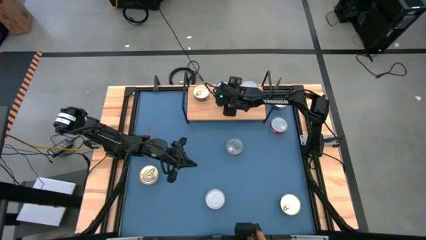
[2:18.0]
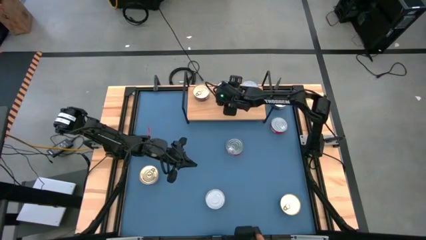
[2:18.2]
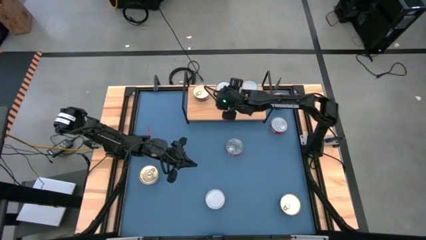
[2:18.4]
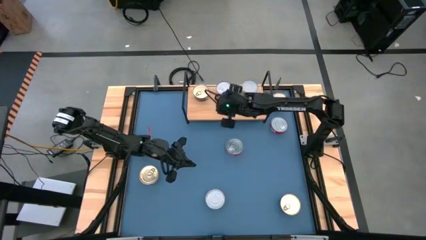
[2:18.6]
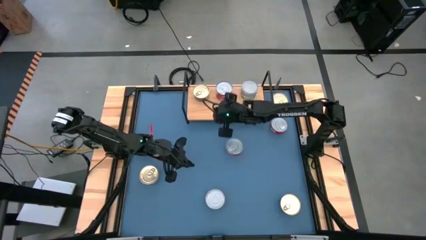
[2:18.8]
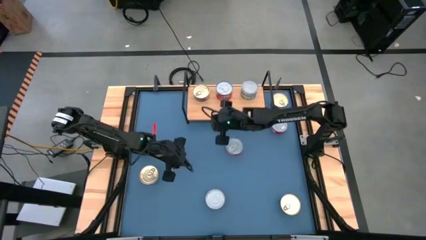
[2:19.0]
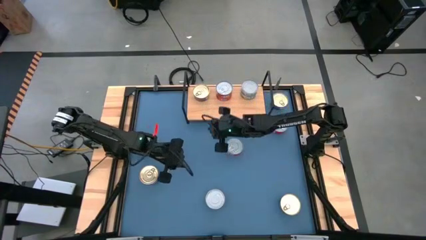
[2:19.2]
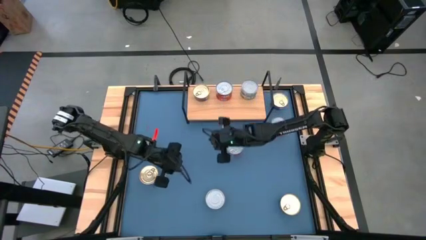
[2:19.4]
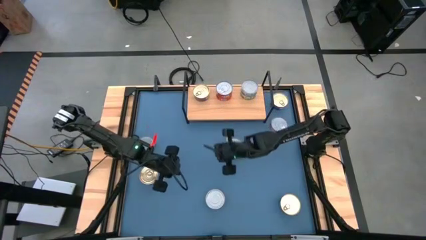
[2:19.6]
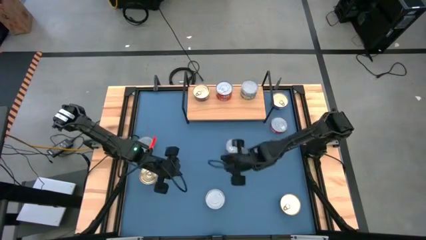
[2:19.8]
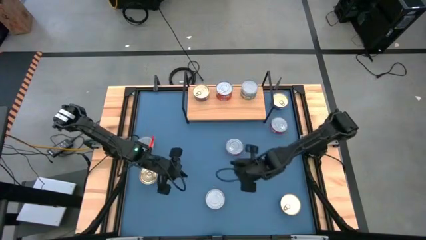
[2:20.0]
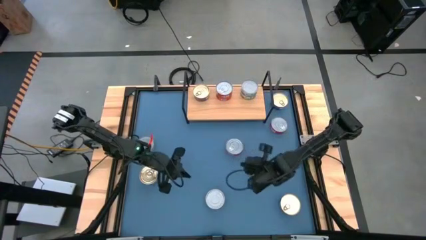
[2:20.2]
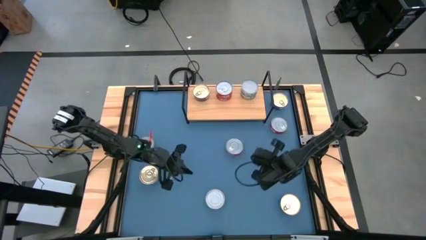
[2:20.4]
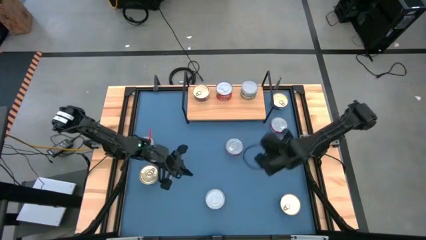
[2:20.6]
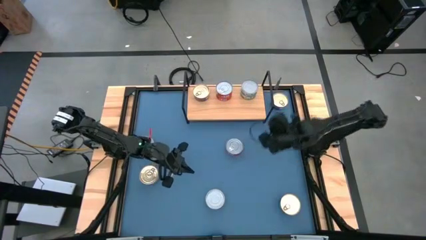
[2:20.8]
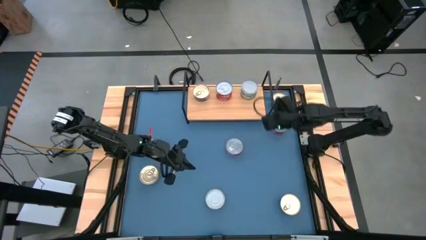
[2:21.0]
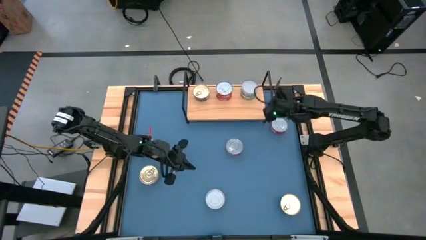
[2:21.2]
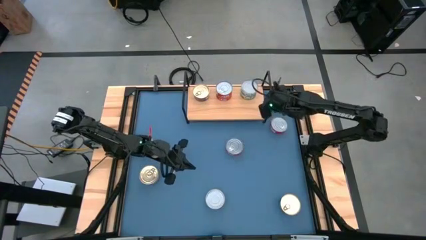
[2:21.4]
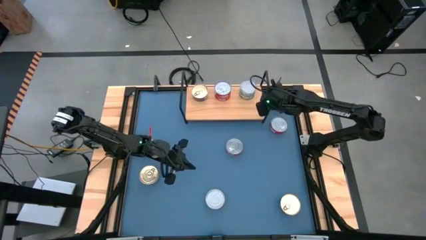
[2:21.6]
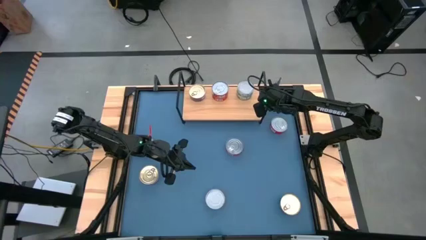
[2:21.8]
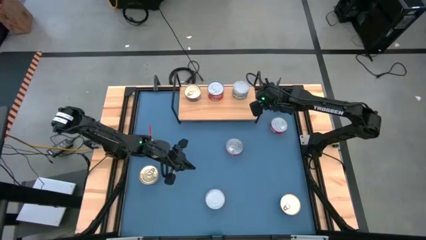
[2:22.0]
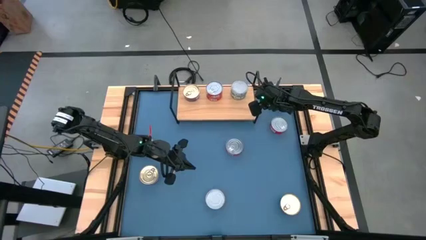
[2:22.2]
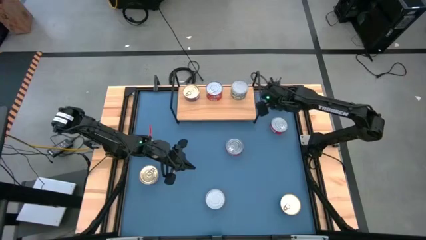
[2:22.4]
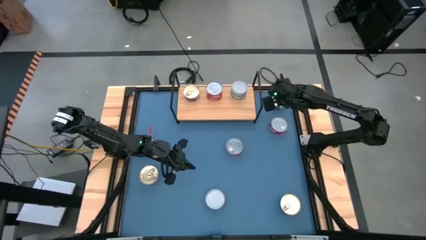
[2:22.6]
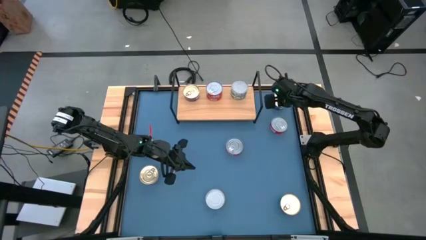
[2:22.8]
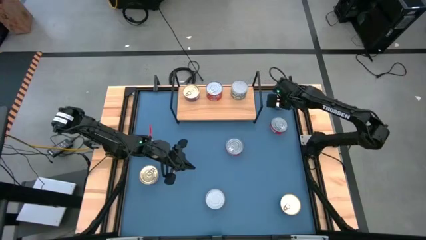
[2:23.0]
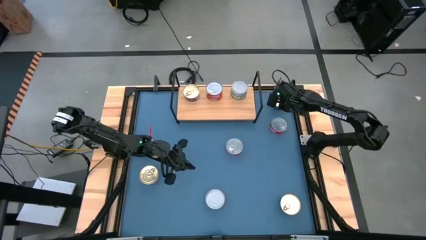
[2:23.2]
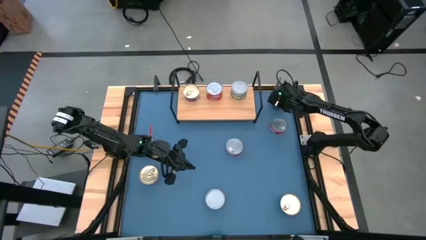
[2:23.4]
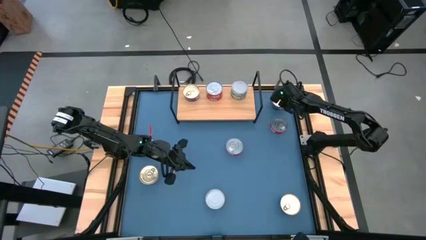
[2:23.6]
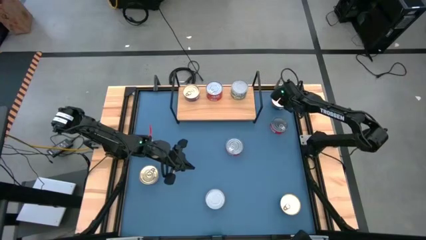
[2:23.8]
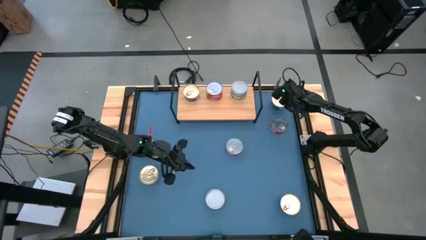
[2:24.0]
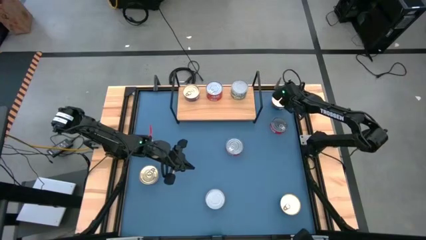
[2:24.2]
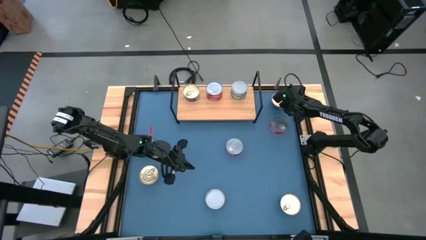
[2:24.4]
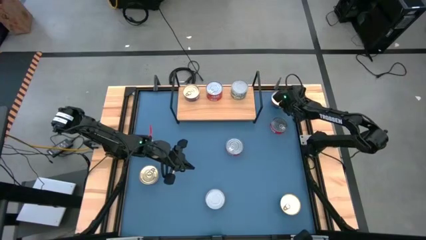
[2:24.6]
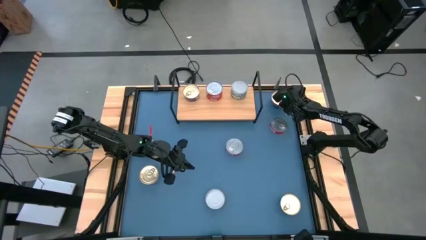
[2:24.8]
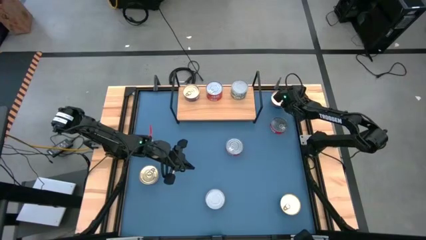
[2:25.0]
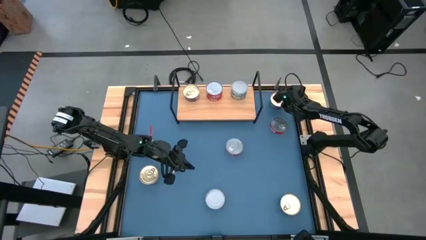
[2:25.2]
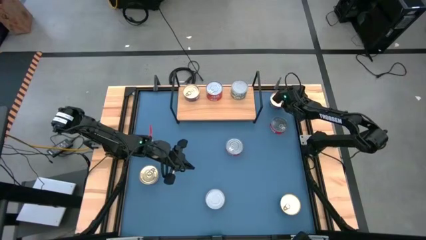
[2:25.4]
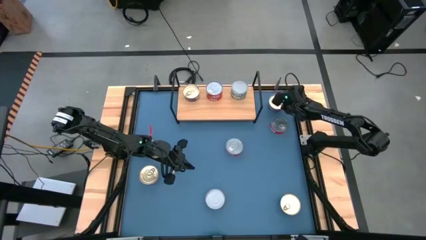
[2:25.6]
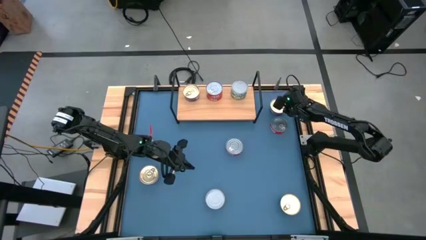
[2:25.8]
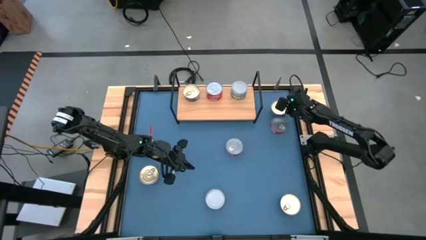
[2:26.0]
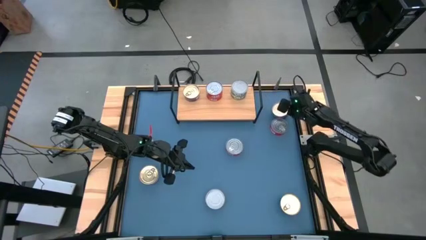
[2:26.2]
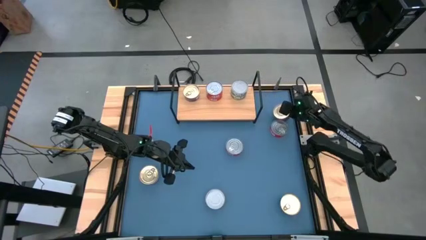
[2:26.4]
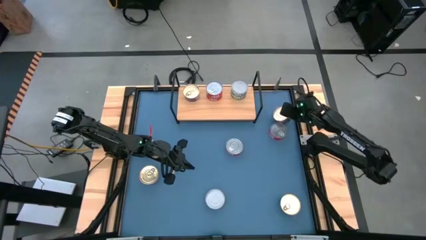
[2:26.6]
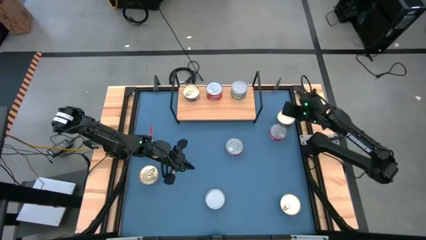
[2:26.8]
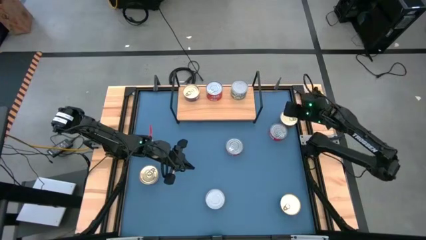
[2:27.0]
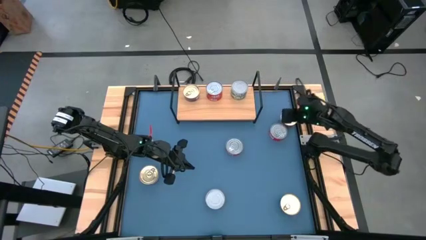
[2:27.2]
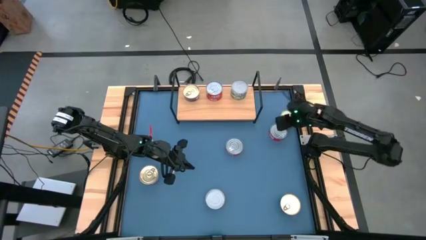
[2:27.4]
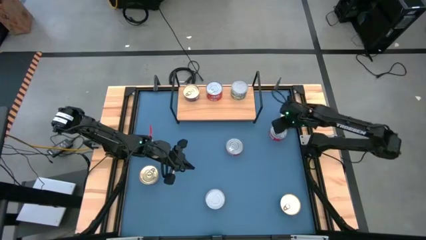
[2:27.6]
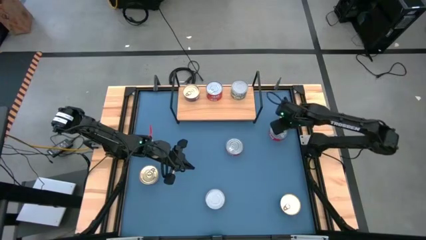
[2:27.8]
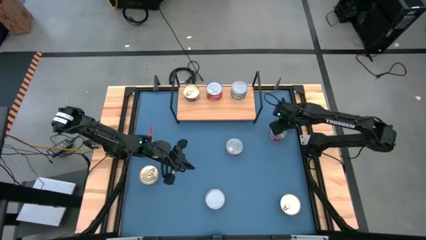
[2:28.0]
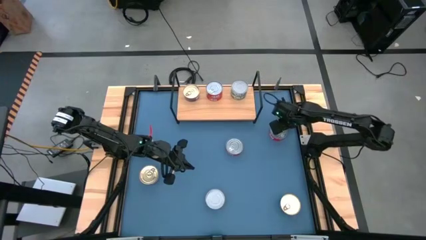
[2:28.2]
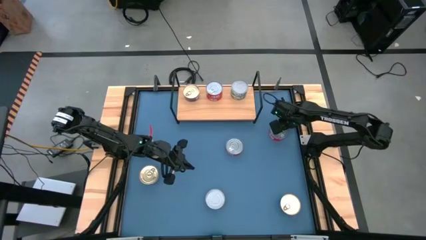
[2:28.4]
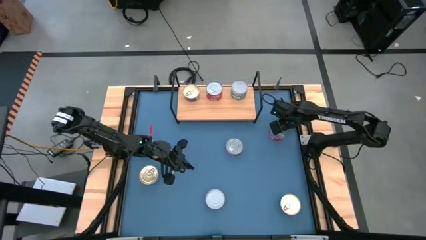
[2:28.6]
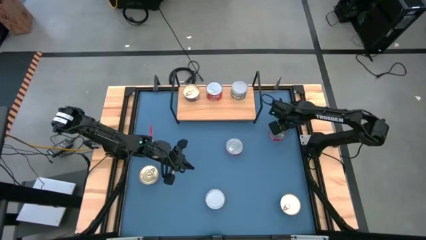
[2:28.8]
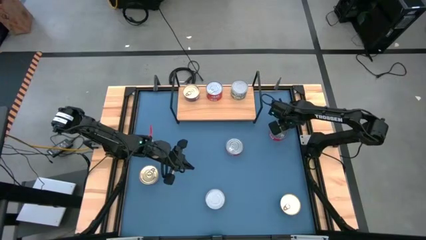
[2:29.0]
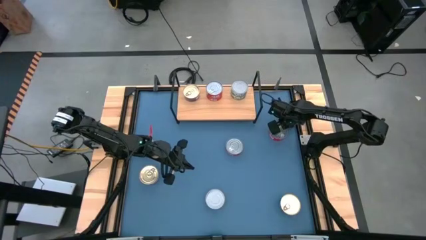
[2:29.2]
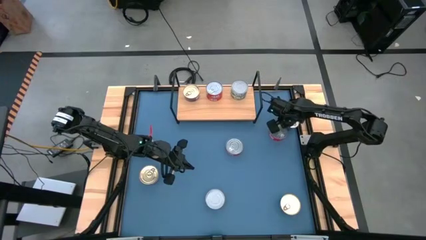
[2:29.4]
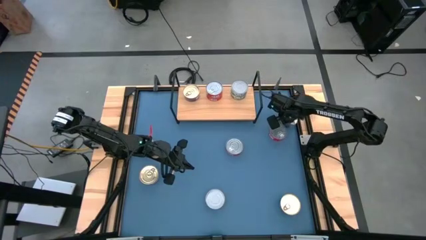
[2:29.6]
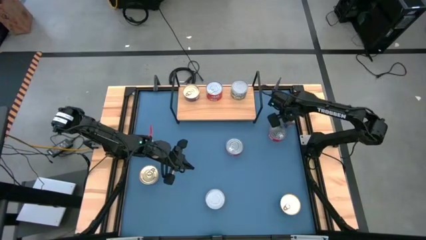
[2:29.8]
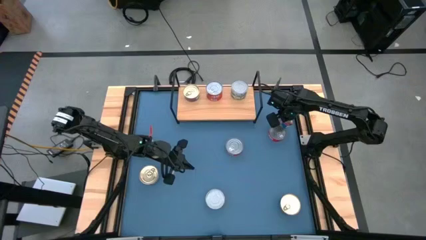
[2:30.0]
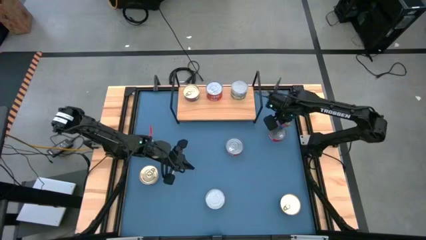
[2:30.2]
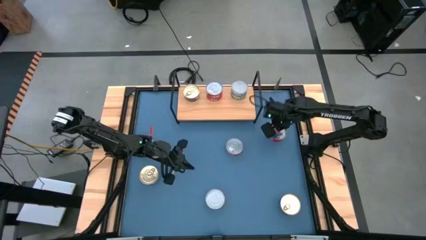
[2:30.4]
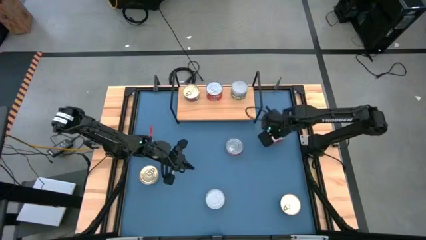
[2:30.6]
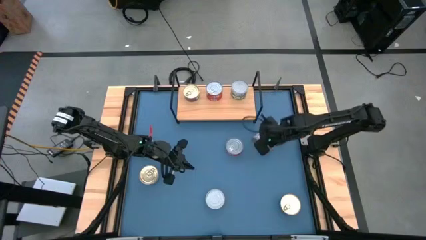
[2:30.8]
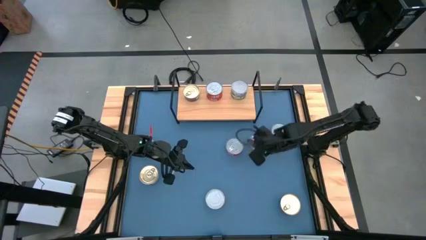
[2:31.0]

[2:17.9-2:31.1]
Task: Stack canned seafood by type on shelf
Stack the blue tuna can on top of the other blue tuna can on the shelf

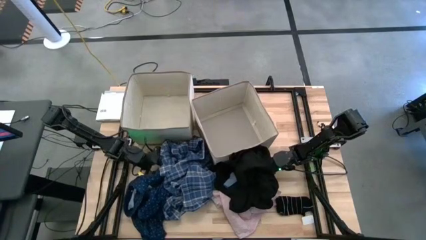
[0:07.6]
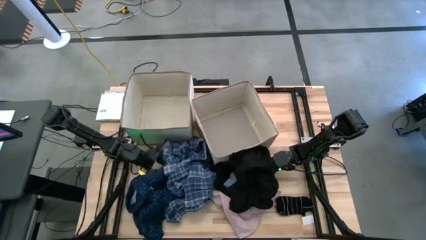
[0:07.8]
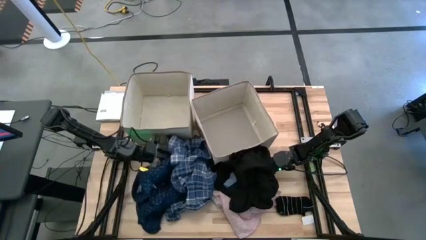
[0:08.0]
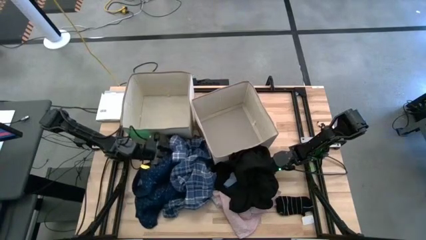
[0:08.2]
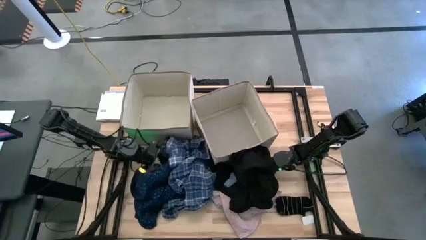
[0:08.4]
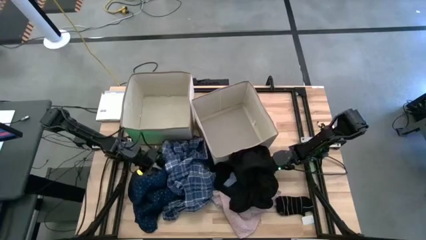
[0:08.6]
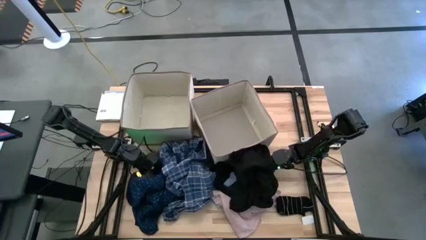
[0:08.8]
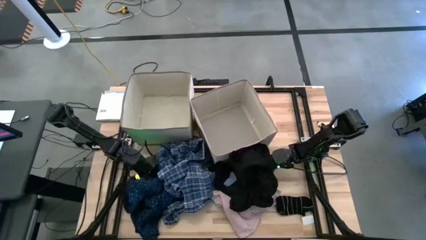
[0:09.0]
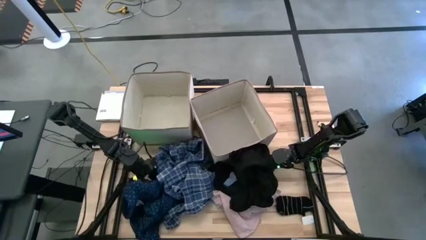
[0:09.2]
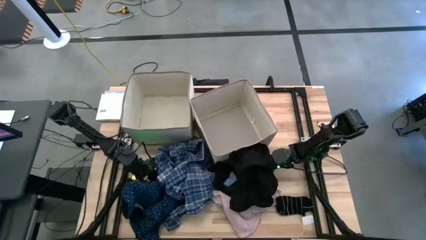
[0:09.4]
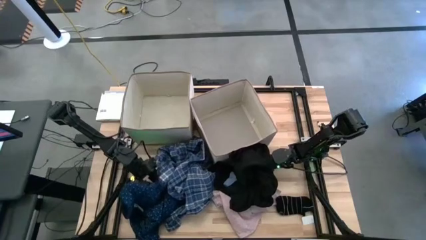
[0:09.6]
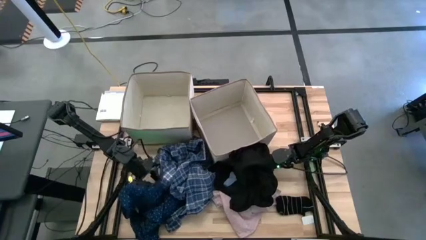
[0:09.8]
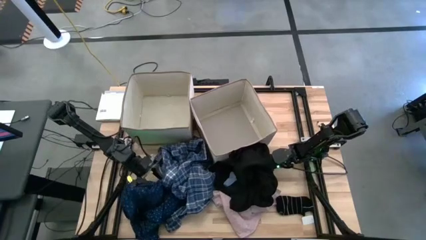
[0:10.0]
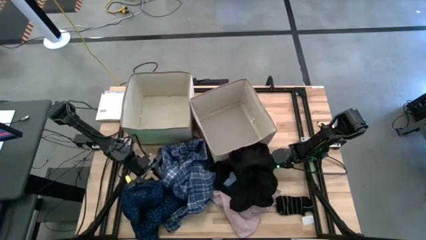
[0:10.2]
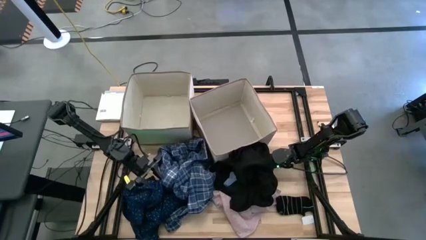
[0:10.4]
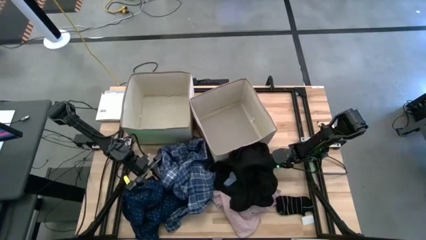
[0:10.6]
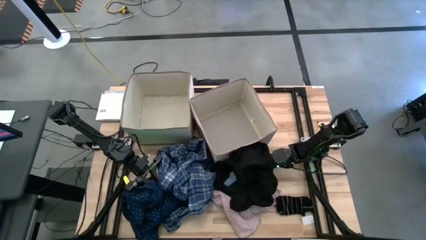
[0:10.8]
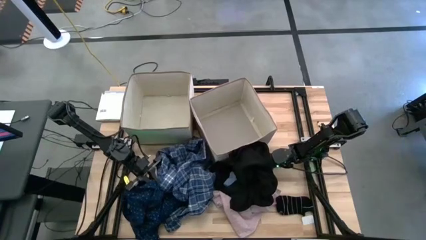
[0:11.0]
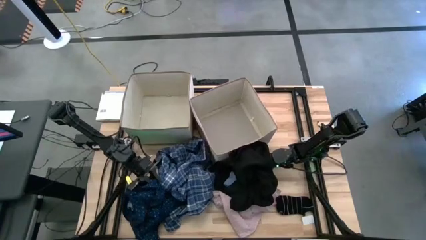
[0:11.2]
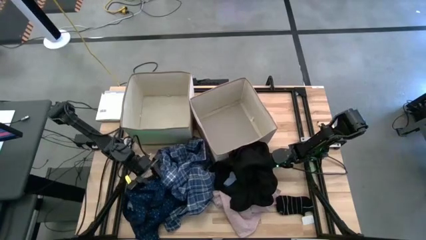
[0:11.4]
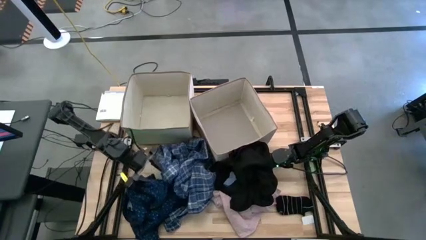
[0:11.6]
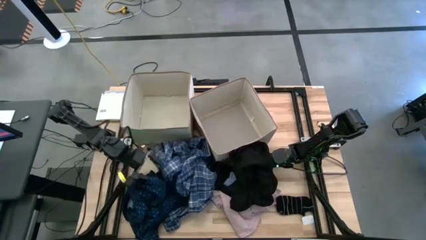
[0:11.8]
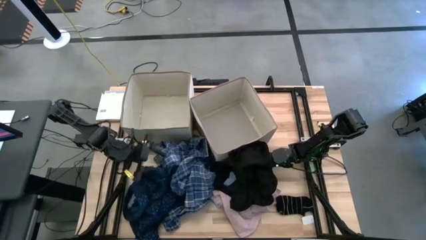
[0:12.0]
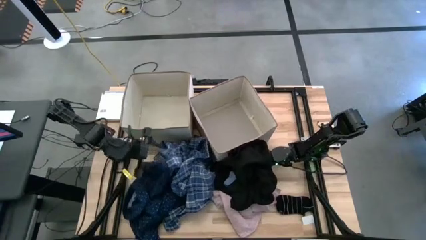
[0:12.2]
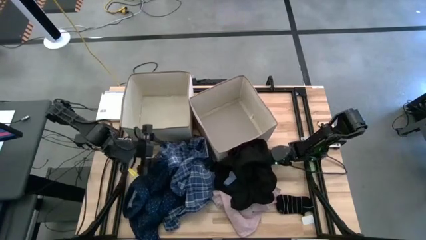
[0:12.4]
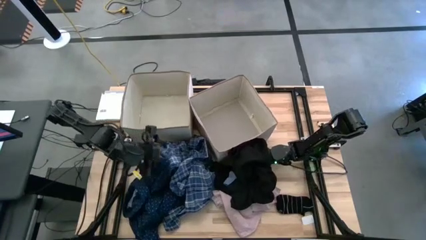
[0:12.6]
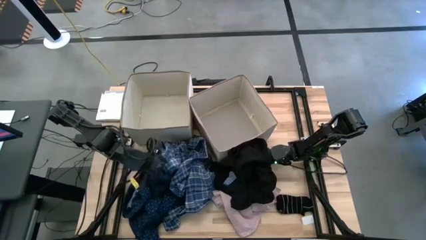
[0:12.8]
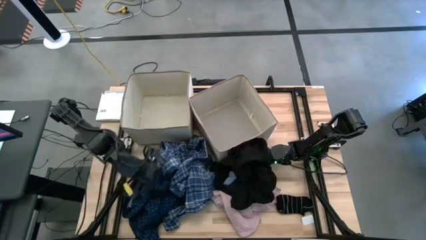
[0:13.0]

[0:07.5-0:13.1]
Task: Sort clothes
Put the dark blue shirt into the left laundry organizer
